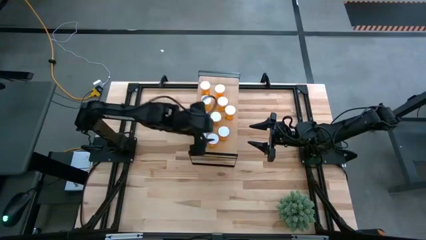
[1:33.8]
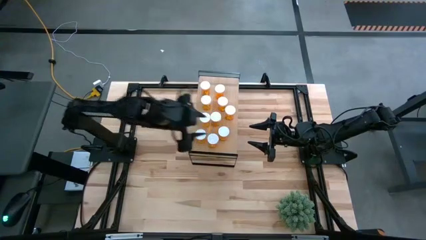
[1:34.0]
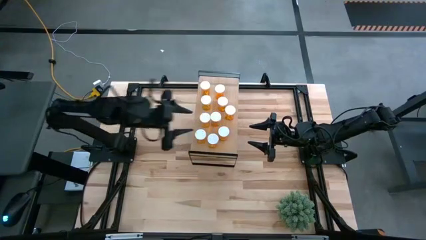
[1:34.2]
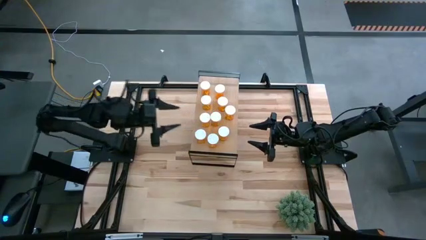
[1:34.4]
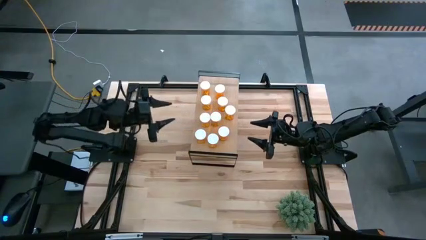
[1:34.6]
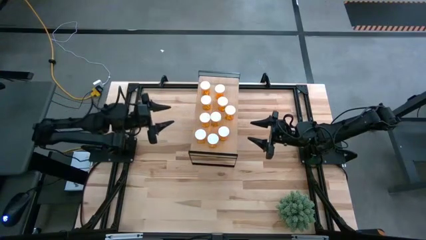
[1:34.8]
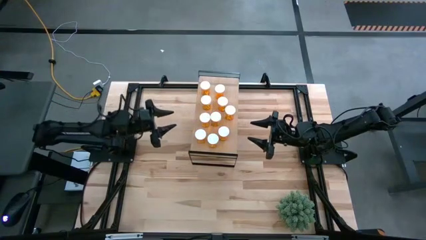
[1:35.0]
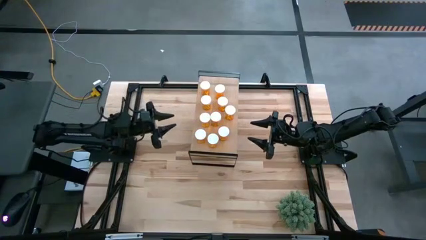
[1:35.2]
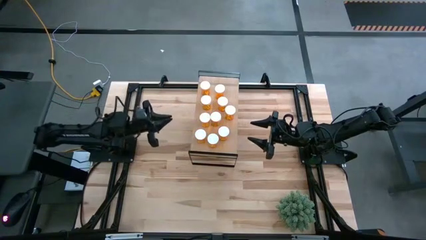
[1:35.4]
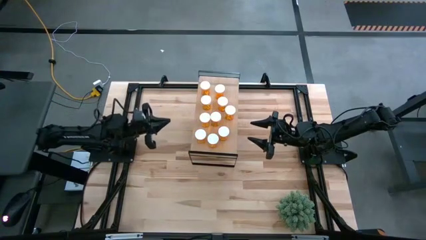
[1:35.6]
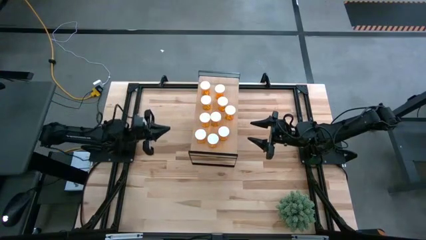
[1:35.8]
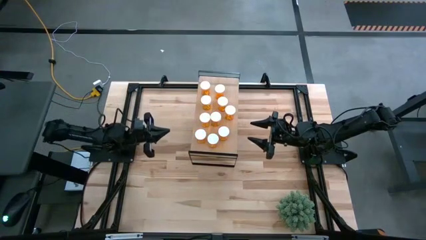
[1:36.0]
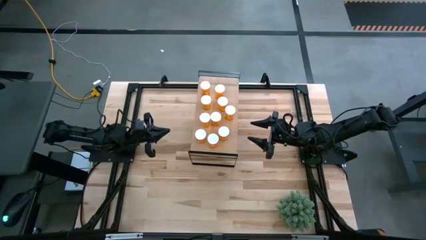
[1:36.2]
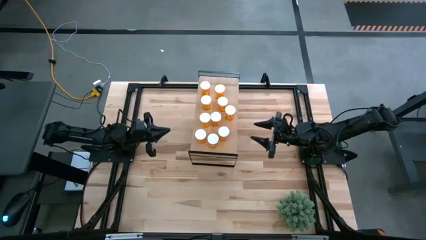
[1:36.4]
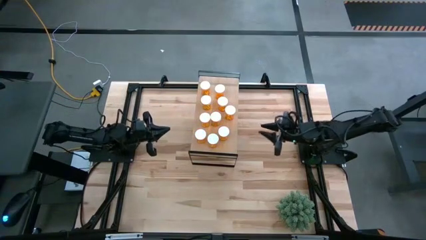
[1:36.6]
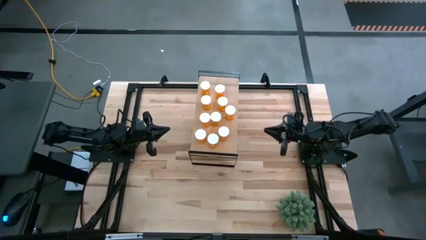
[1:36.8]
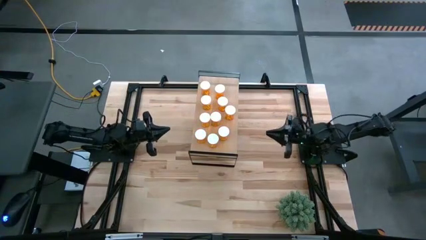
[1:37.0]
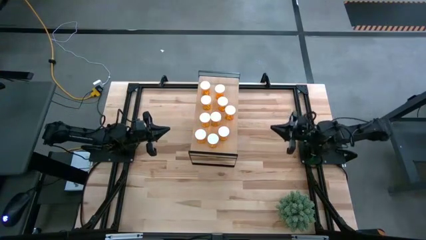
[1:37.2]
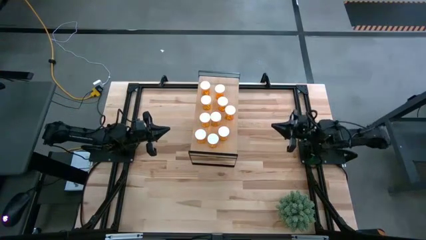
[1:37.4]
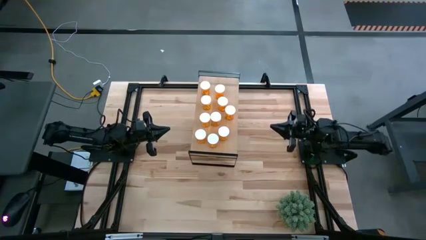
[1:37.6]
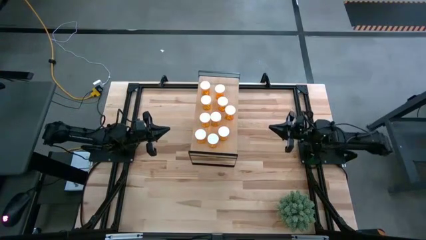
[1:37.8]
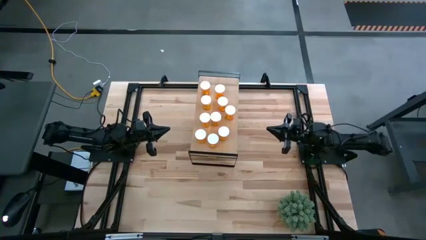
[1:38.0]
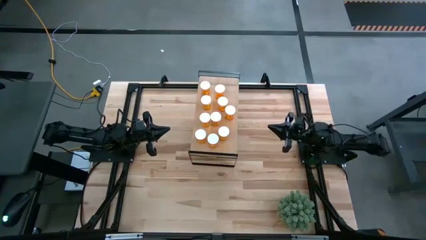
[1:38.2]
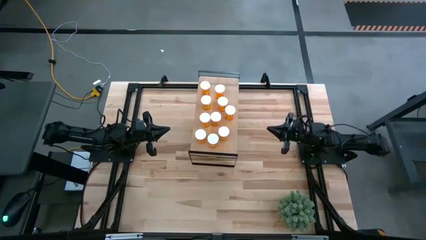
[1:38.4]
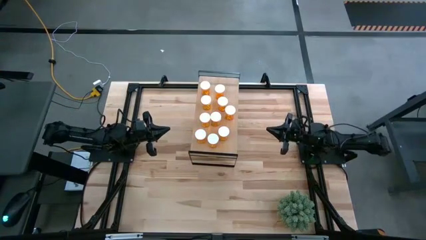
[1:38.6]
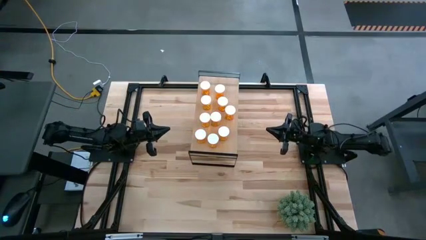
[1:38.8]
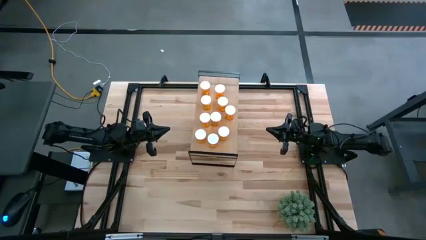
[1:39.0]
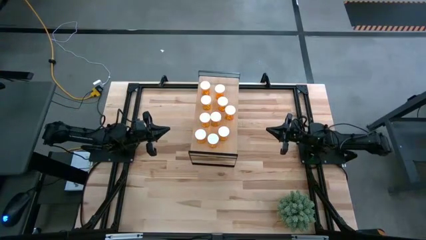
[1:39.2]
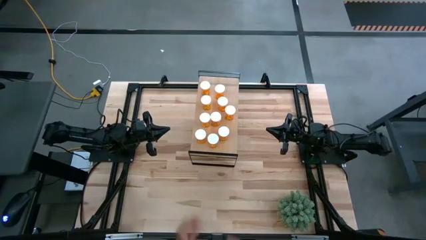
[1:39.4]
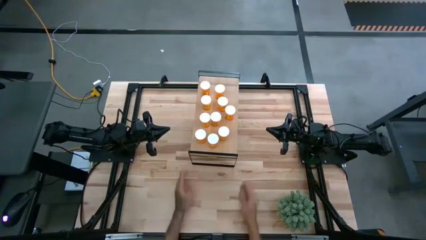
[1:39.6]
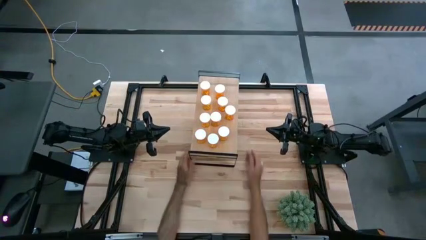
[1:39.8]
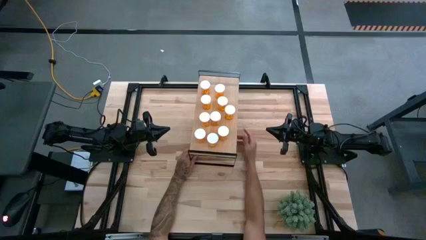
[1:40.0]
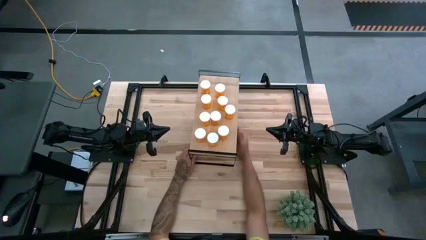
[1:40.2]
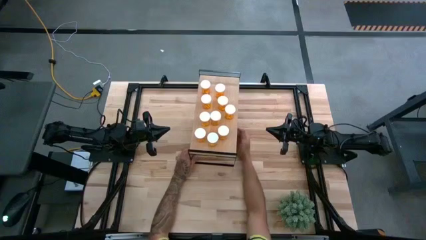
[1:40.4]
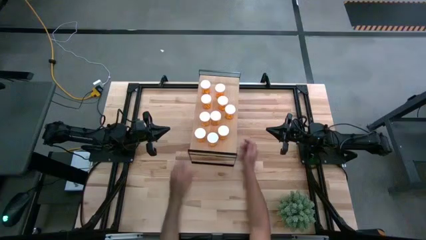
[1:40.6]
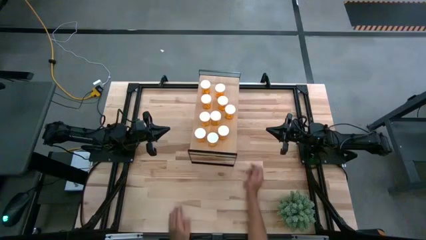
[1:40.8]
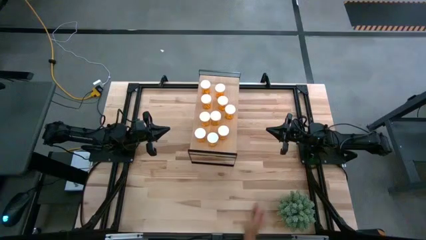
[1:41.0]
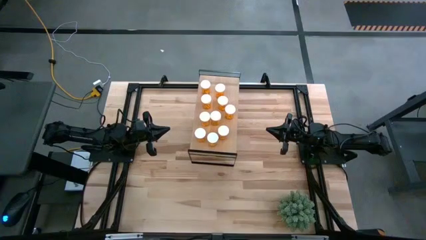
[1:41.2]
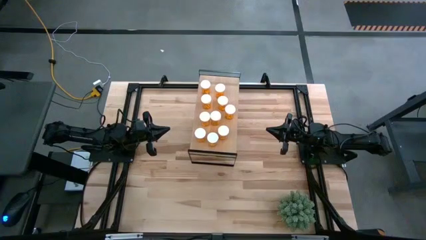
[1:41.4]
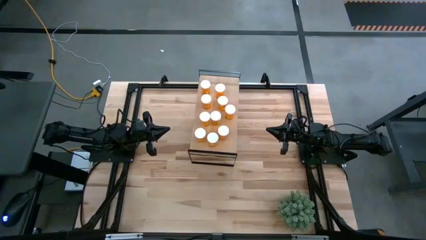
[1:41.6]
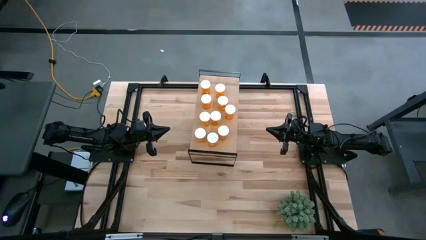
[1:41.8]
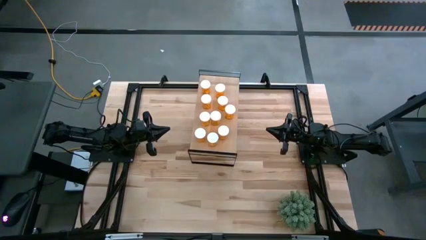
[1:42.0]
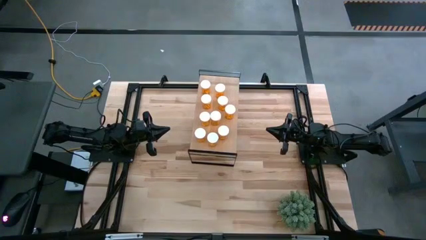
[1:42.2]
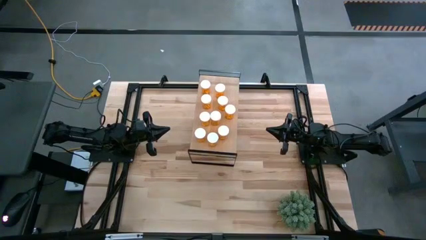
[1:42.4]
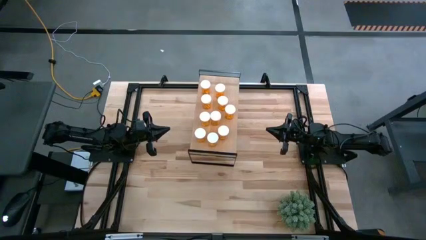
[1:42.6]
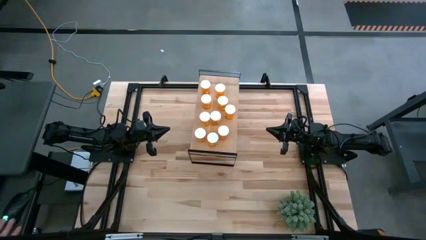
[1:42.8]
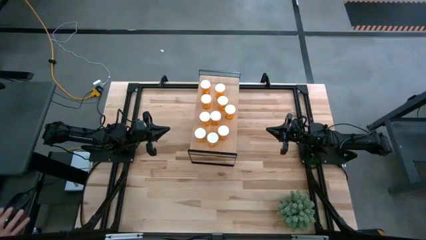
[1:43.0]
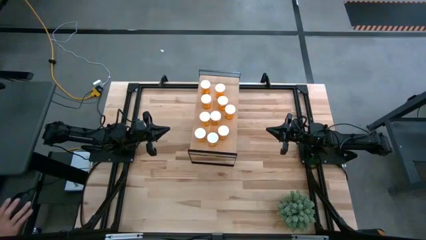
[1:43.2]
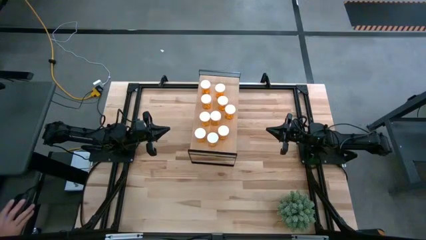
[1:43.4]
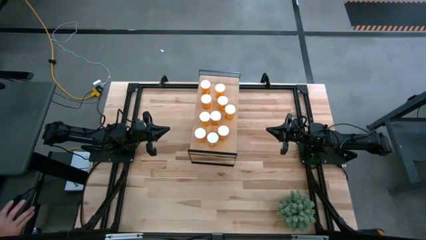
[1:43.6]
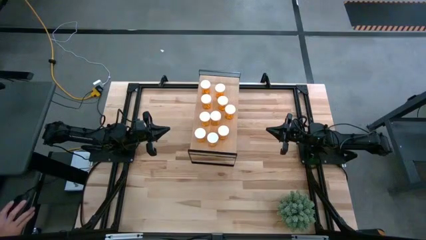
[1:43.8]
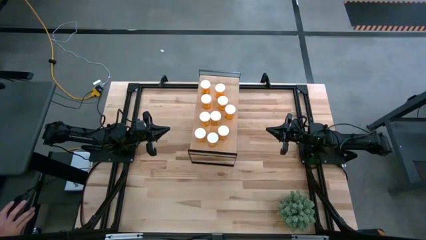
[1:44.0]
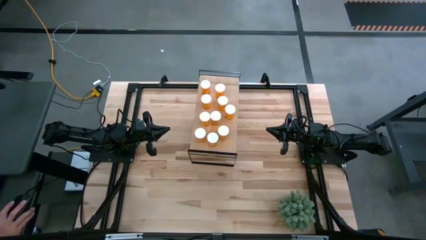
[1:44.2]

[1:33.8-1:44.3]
Task: Pick and place medicine bottles onto shelf by color
Return to Home Position

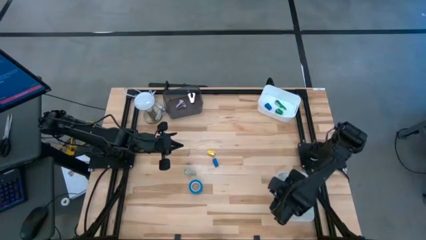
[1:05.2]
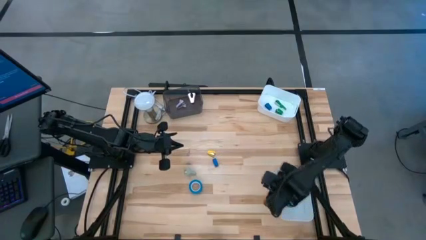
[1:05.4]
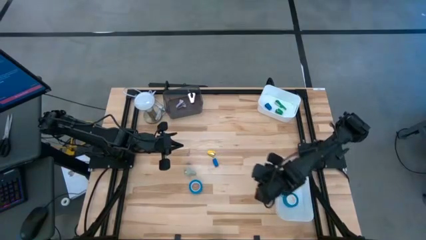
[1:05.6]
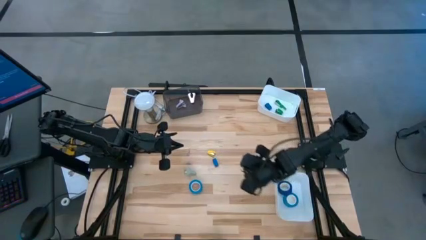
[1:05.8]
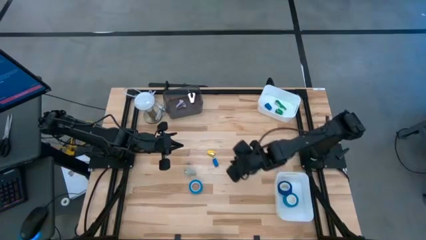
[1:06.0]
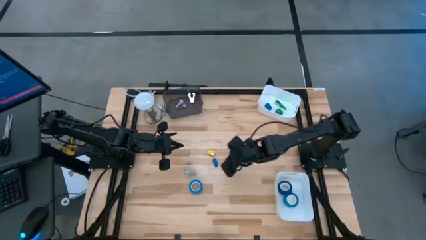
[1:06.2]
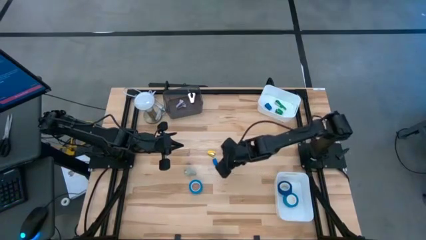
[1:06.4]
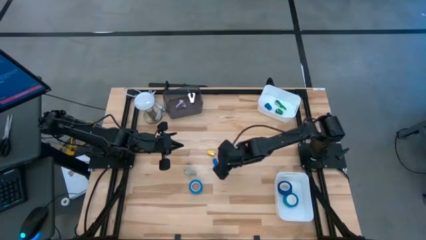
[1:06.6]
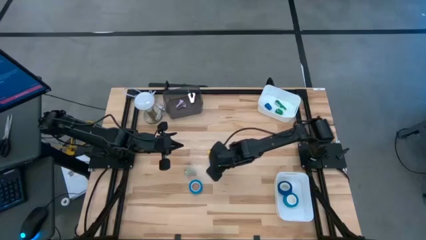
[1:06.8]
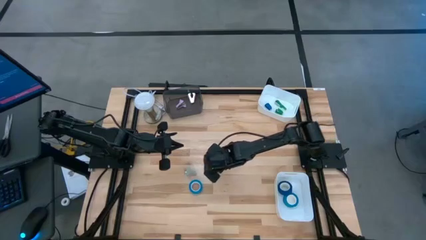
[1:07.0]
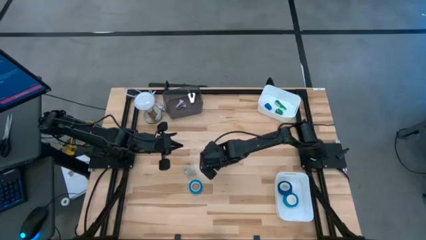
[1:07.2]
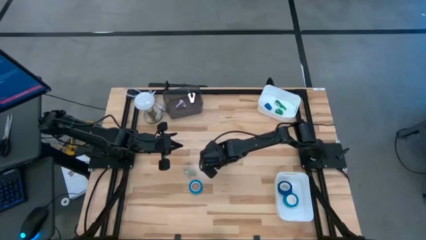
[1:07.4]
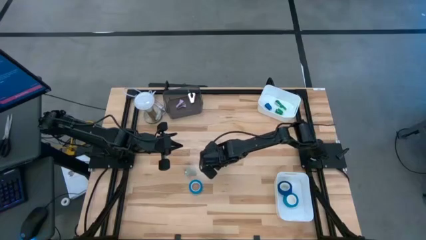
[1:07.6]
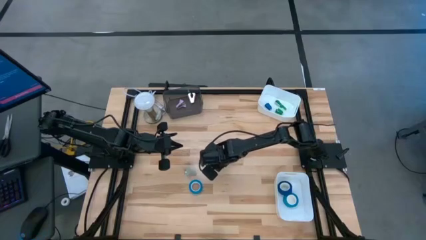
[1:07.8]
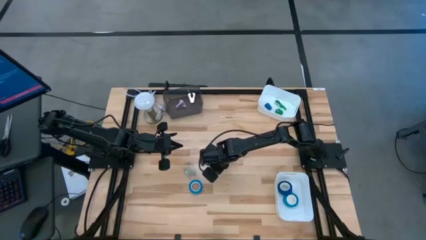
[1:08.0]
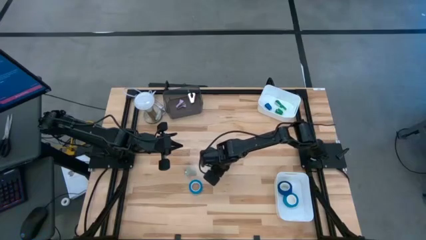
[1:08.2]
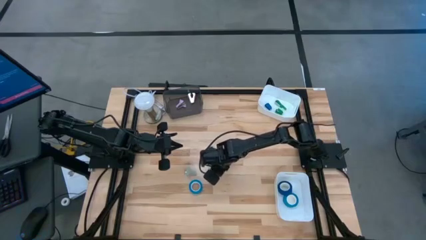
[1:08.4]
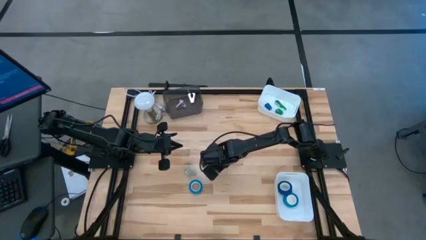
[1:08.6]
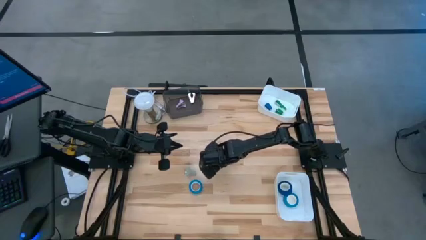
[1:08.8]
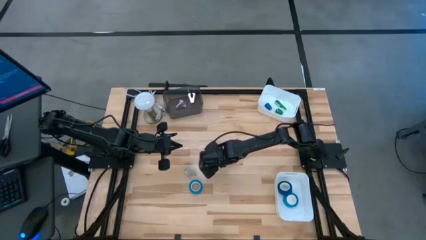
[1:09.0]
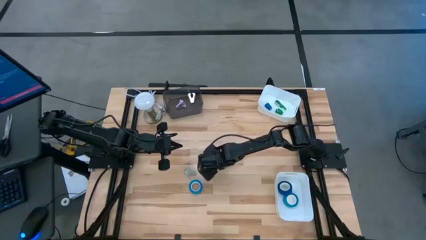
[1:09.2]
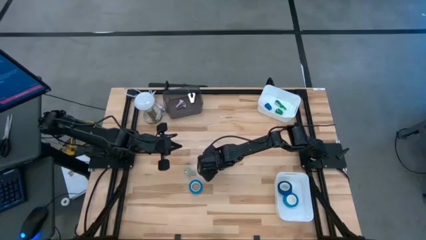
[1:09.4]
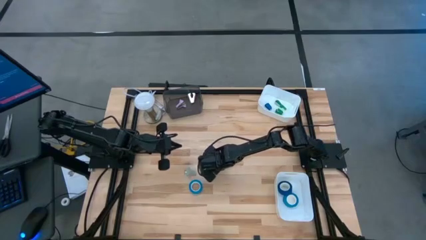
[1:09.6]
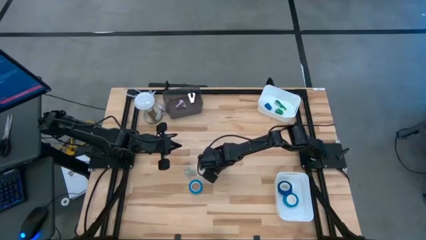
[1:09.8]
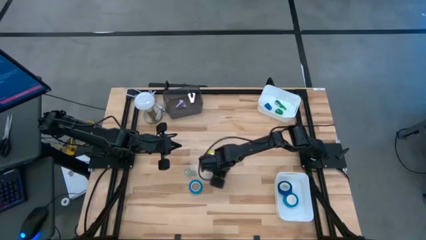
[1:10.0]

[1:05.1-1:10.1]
Task: Pick and place Stapler, Stapler remover, tape
Put the blue stapler into the top white bin
